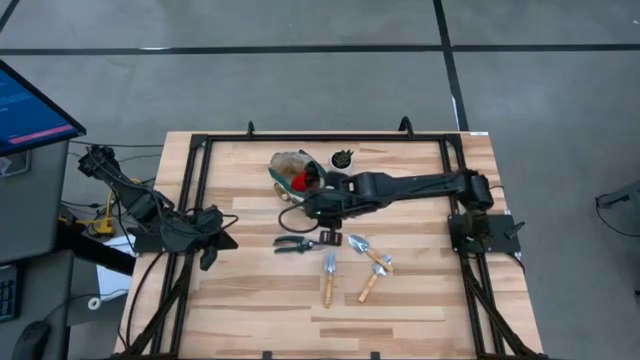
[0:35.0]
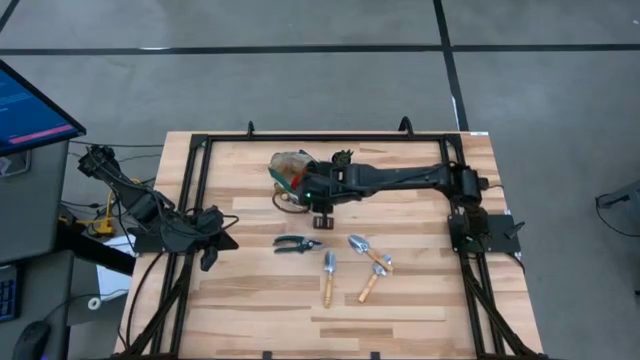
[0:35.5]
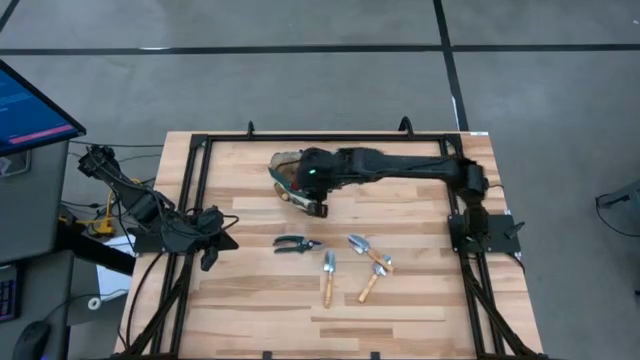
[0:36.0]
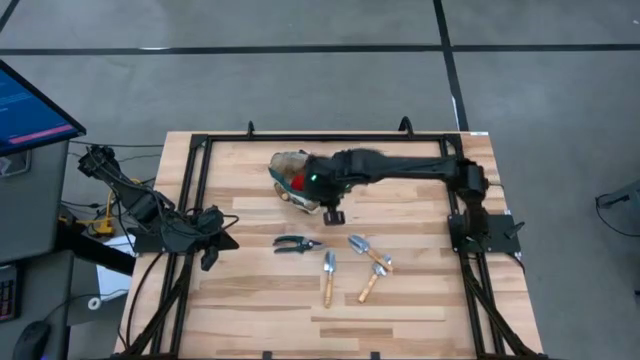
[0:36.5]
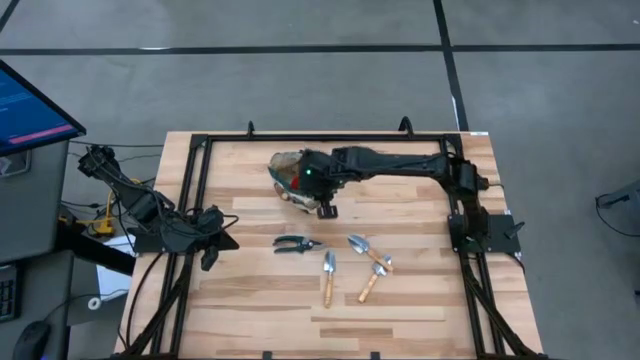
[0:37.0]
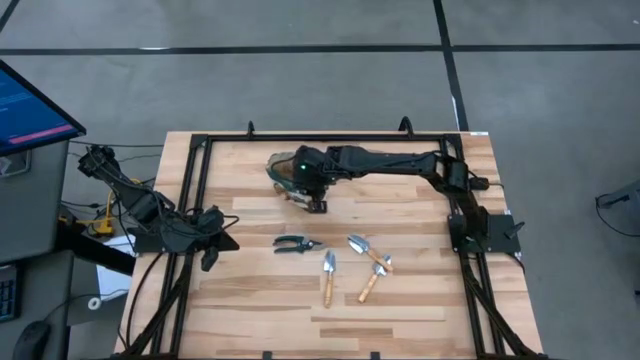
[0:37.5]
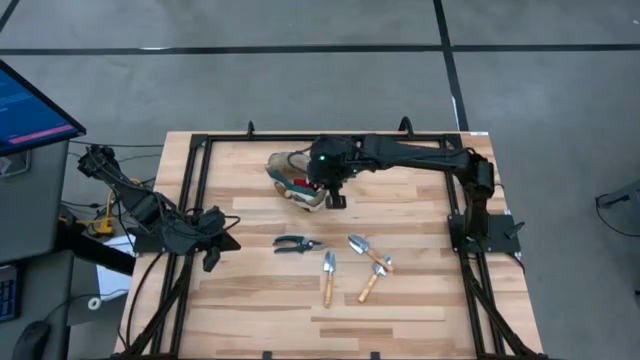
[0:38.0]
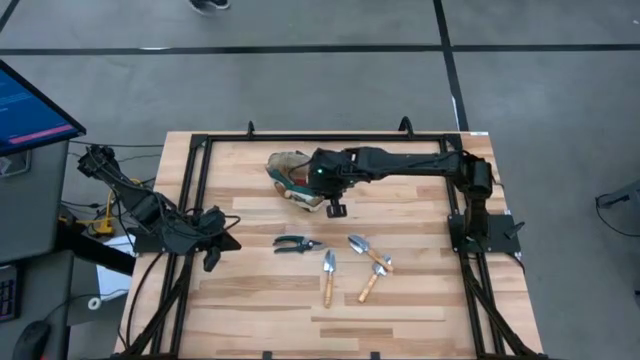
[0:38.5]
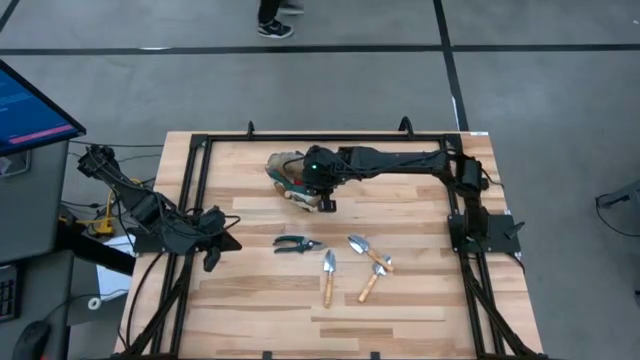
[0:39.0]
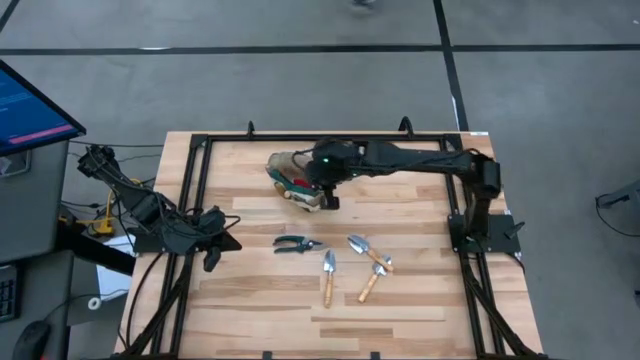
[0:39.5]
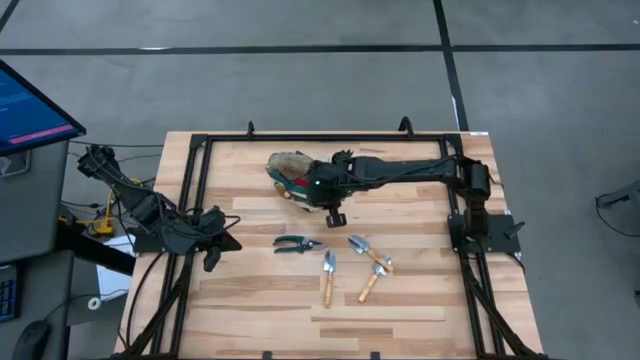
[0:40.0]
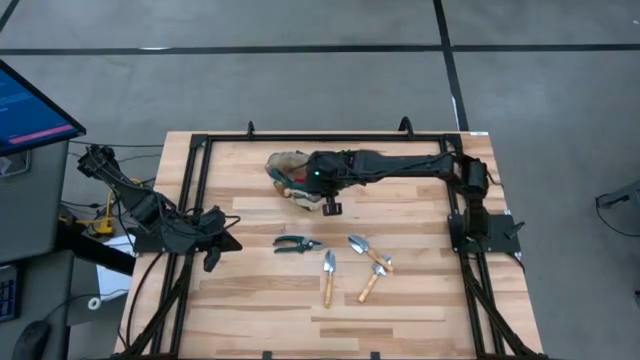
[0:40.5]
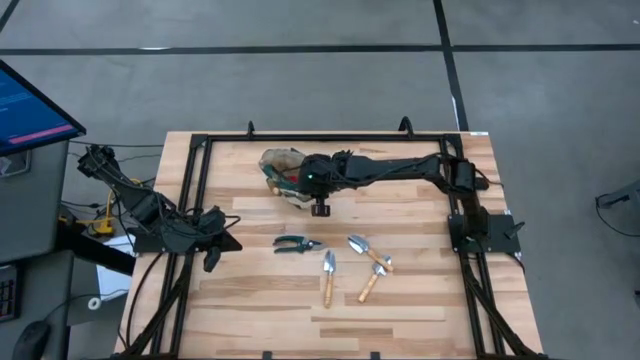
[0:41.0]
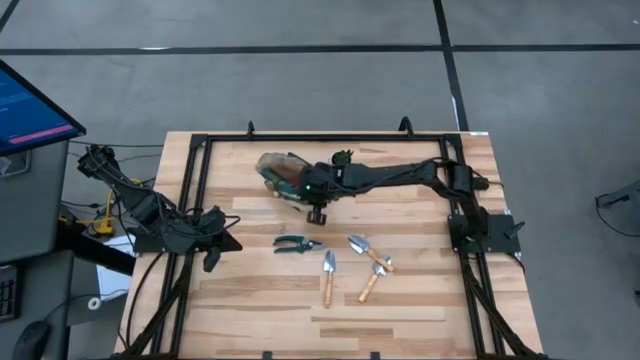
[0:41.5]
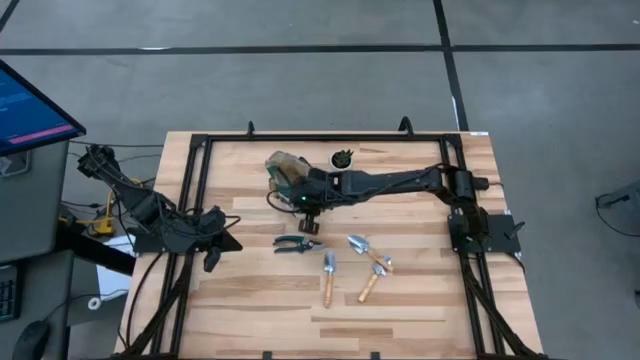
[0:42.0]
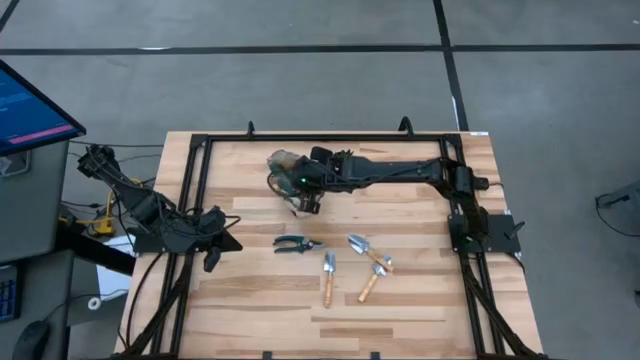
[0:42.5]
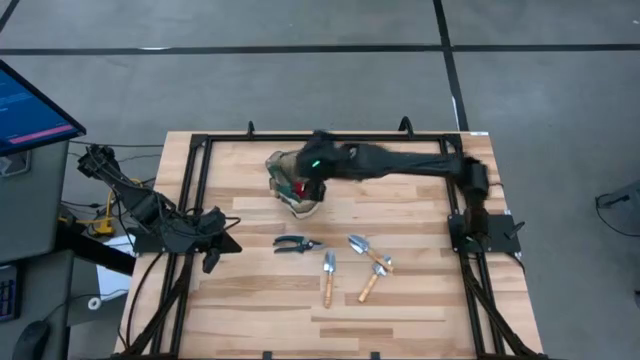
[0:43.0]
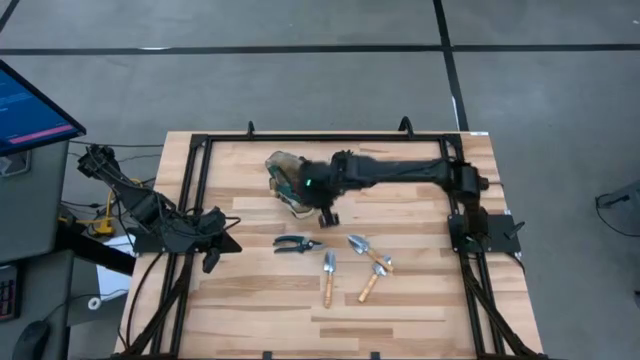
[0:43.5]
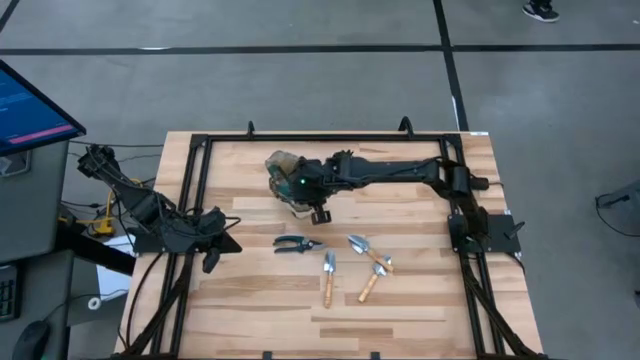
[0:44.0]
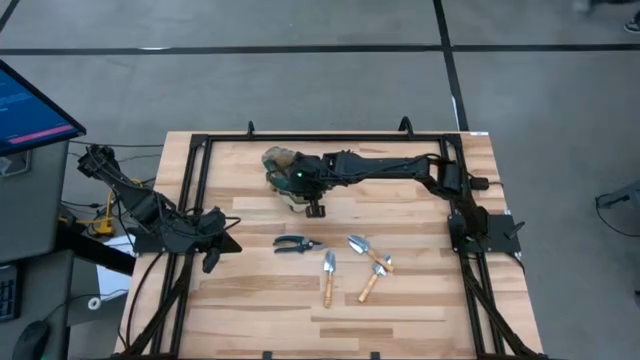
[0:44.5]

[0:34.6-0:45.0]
Task: Pick & Place Garden tools in Gardening bag
Open the pocket of the white gardening bag

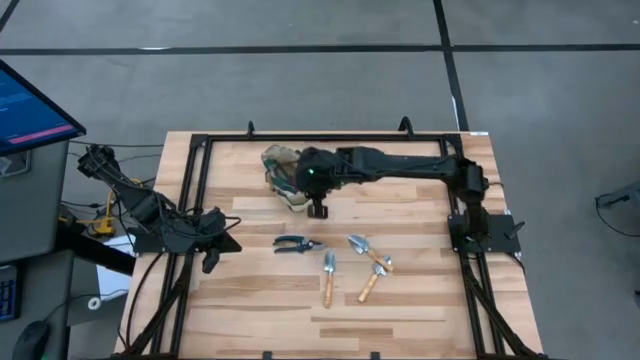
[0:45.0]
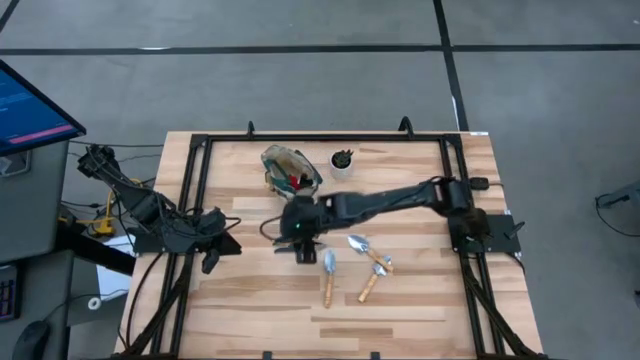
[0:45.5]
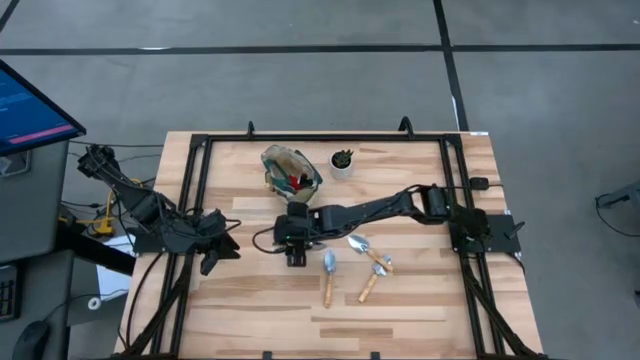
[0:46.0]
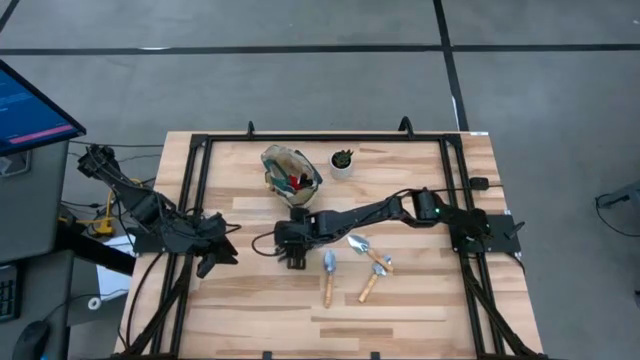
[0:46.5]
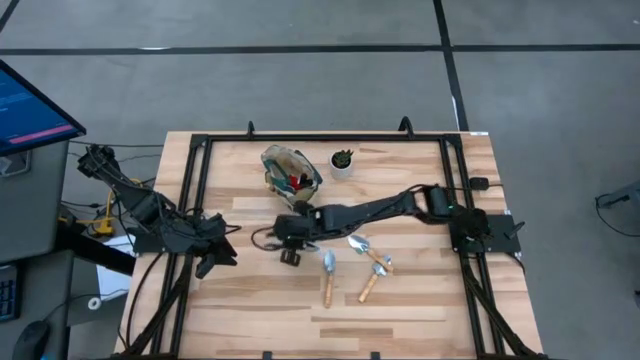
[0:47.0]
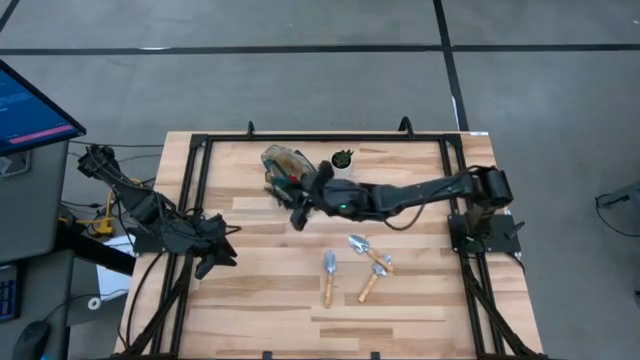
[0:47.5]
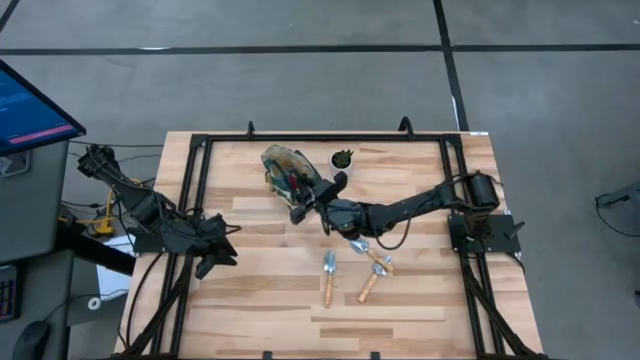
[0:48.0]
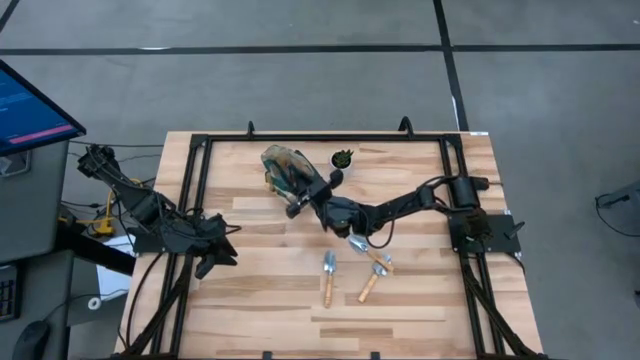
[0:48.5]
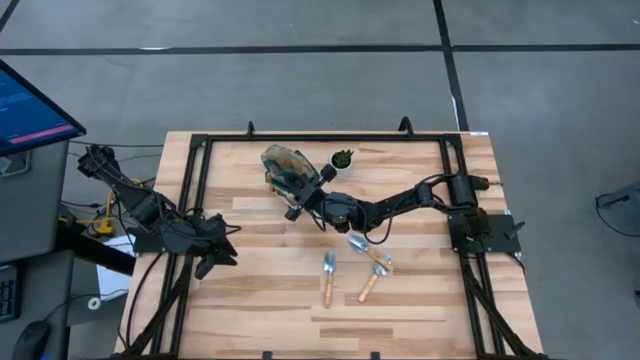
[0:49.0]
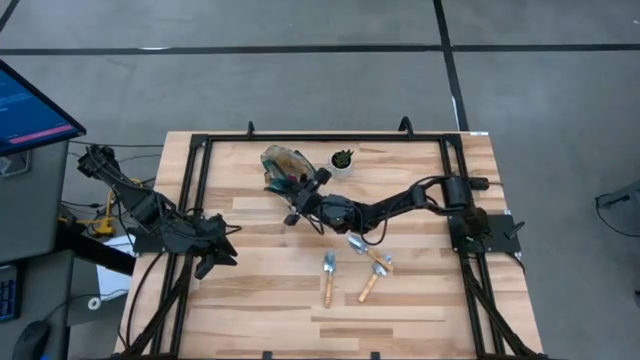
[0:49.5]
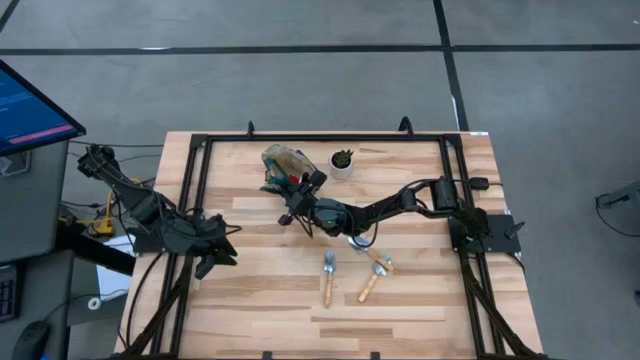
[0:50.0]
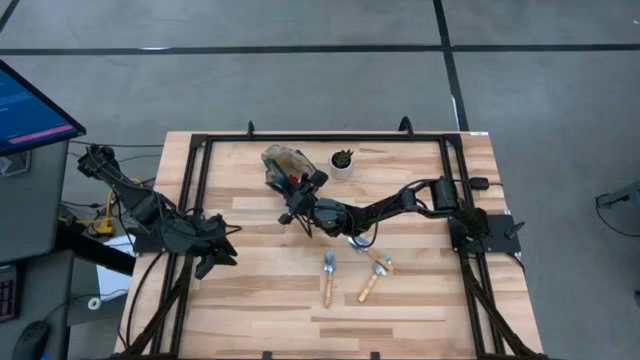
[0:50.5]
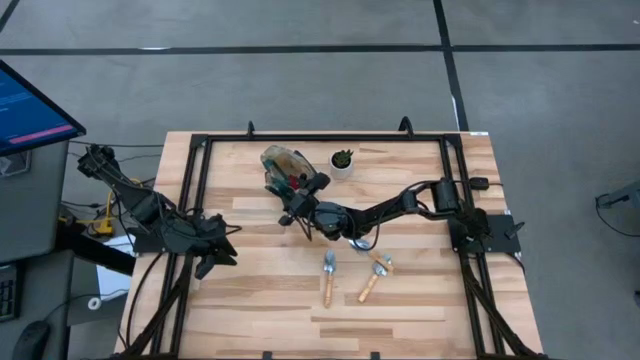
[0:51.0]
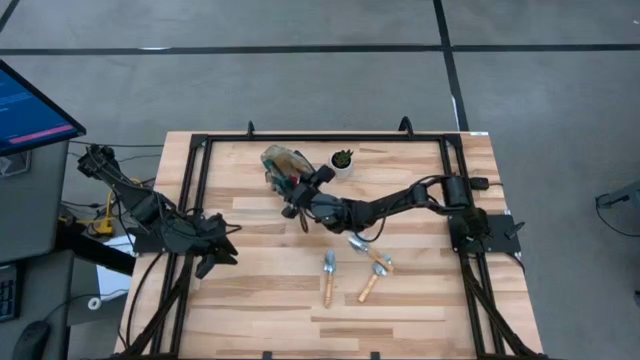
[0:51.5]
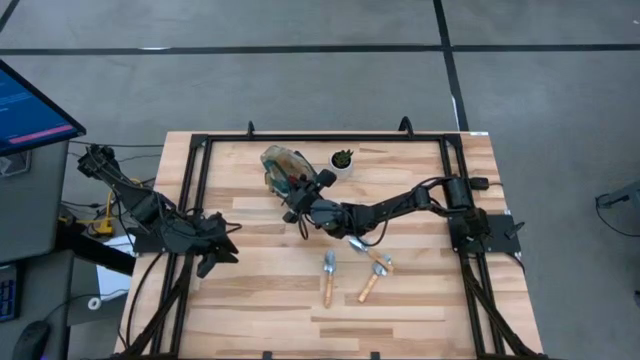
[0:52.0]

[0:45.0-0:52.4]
Put the green shear scissors into the pocket of the white gardening bag

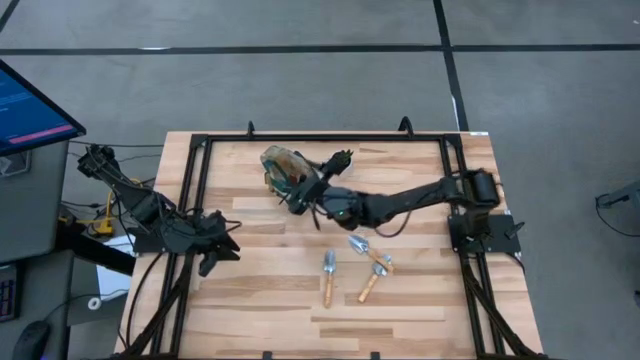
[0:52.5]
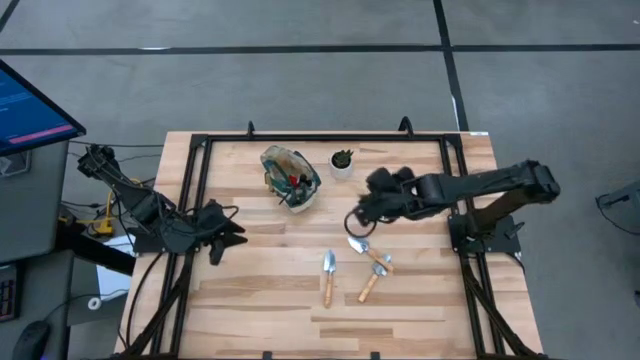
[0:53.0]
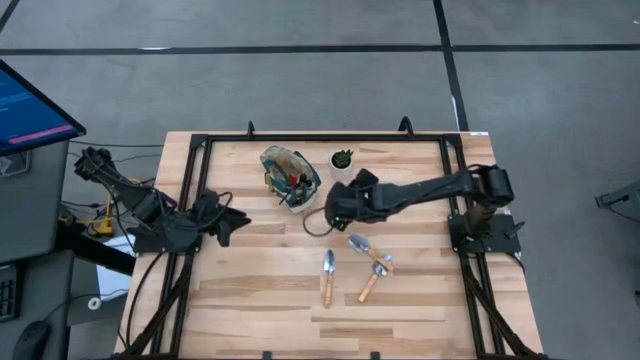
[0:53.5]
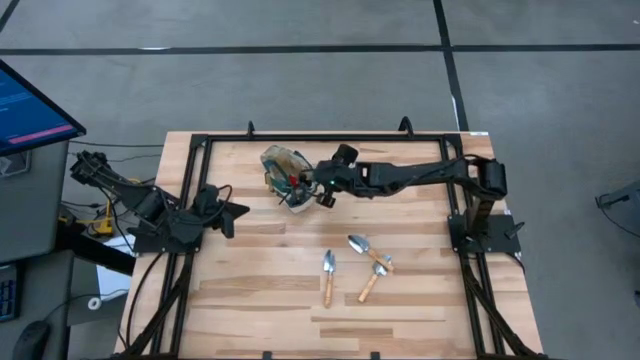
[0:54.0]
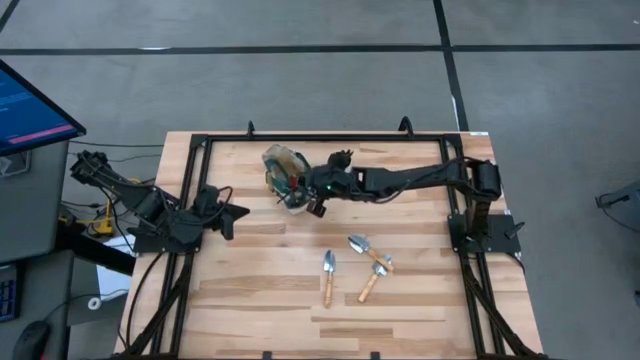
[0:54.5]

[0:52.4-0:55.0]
Adjust the white gardening bag
